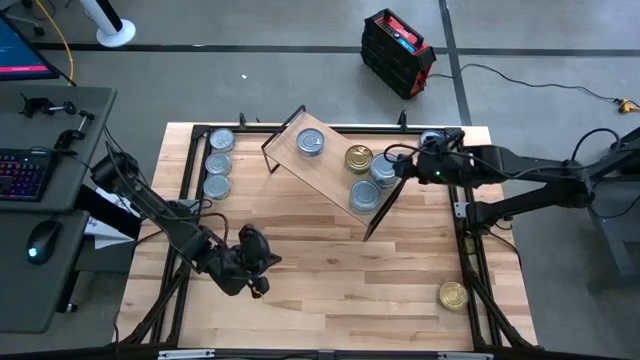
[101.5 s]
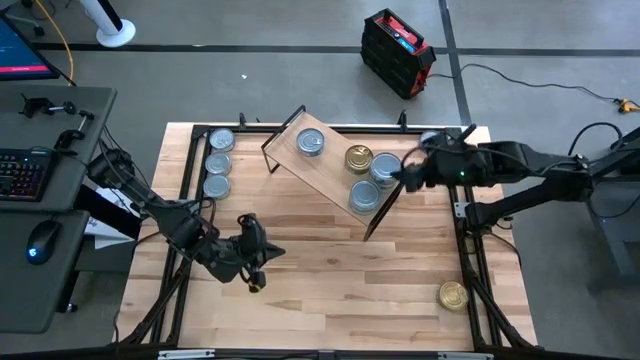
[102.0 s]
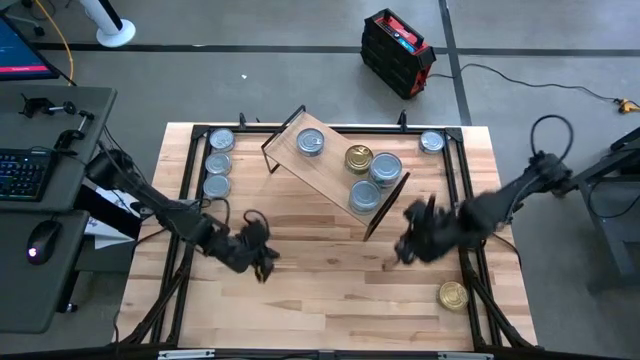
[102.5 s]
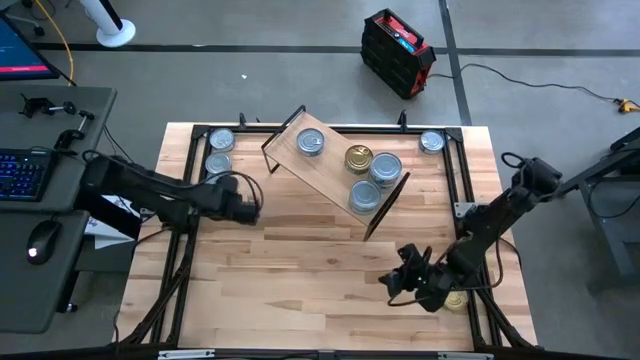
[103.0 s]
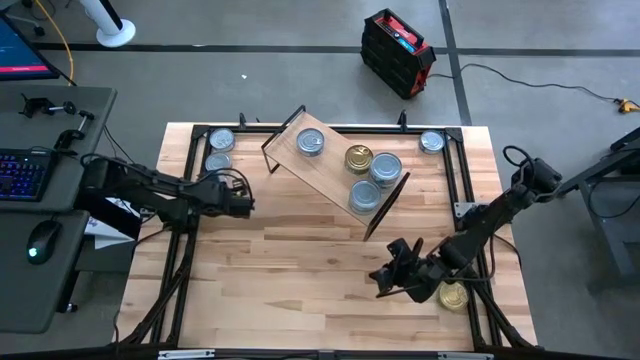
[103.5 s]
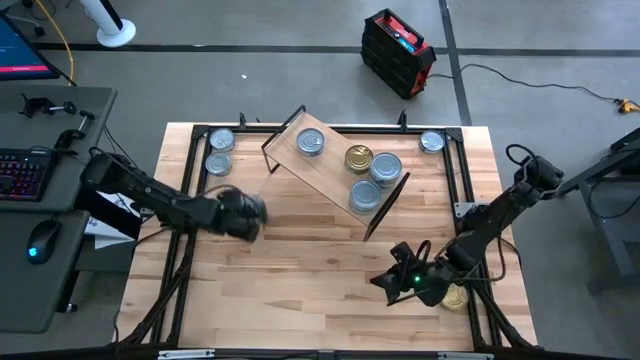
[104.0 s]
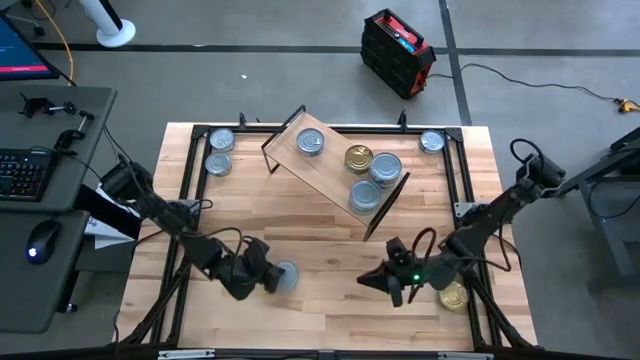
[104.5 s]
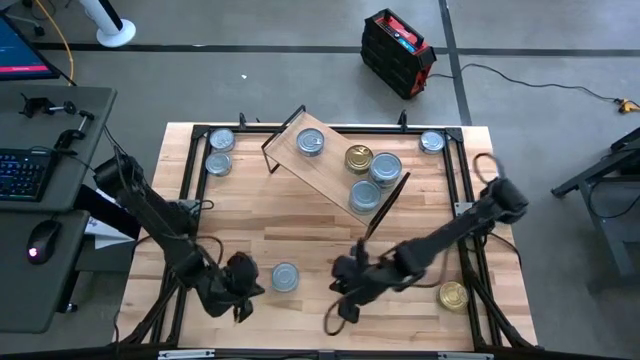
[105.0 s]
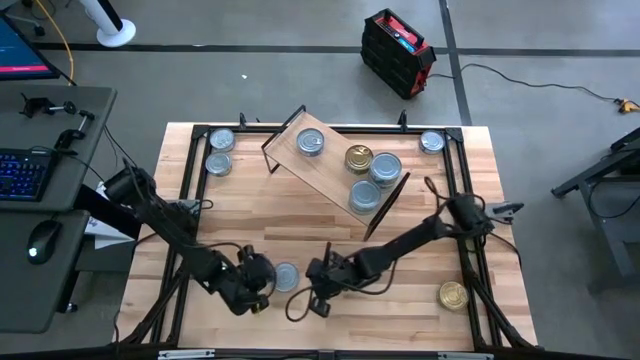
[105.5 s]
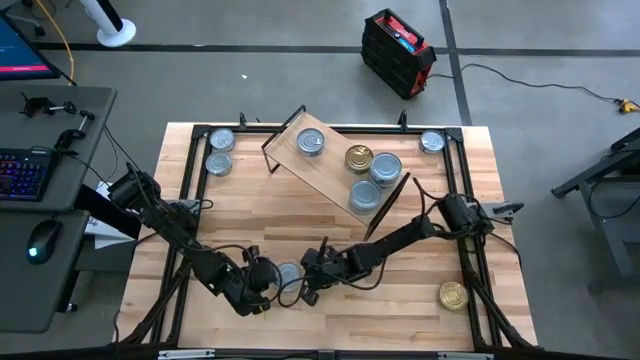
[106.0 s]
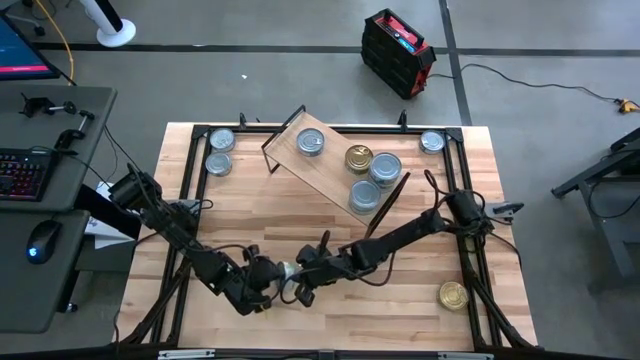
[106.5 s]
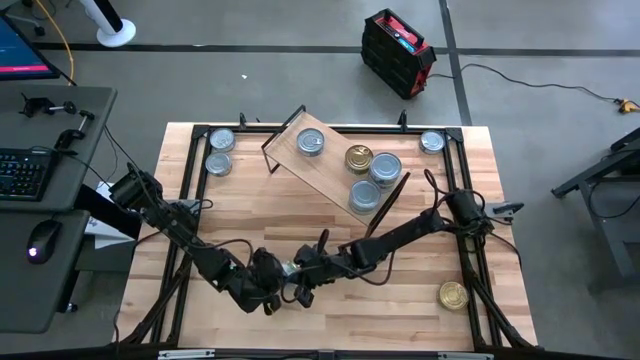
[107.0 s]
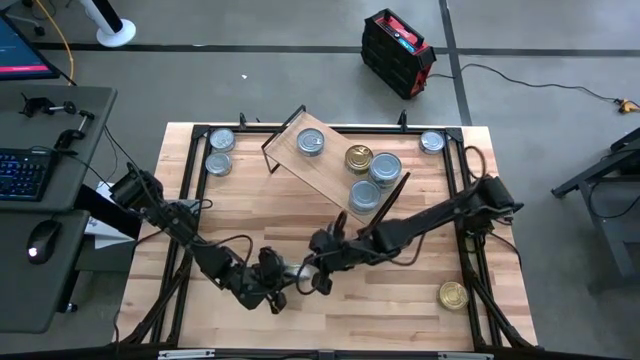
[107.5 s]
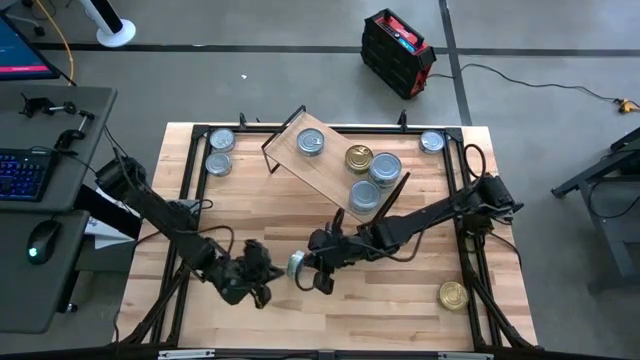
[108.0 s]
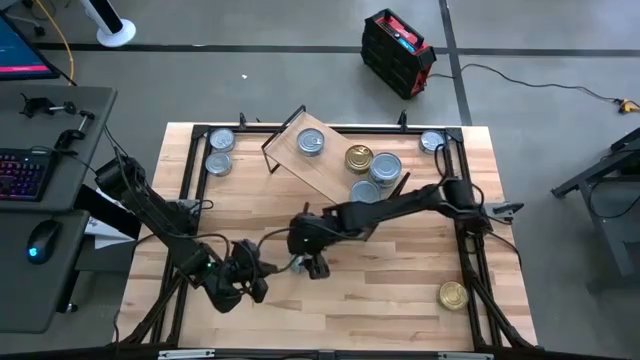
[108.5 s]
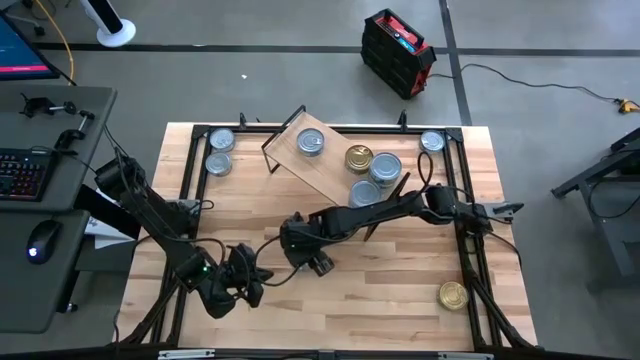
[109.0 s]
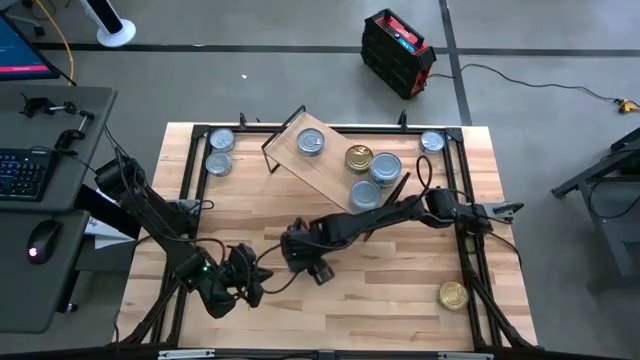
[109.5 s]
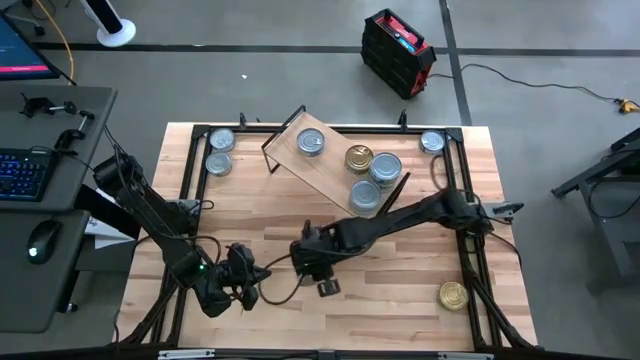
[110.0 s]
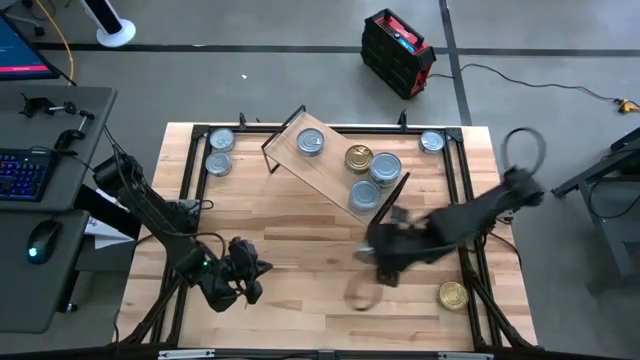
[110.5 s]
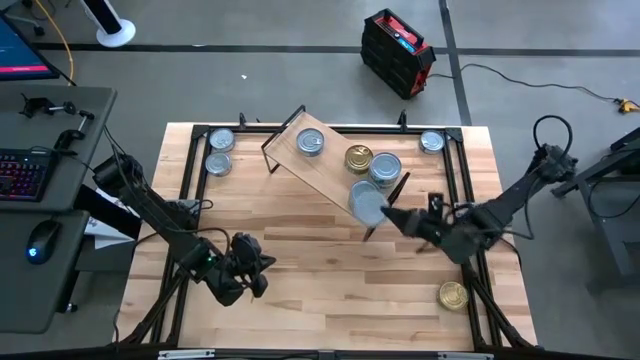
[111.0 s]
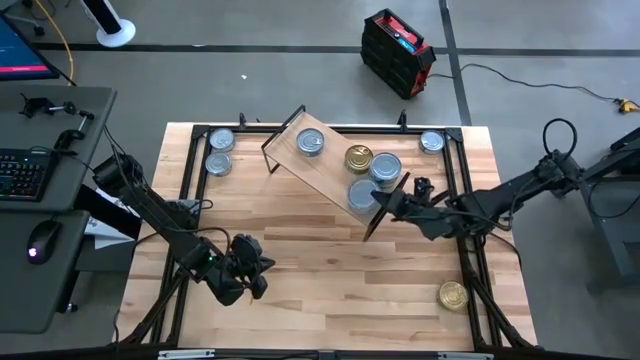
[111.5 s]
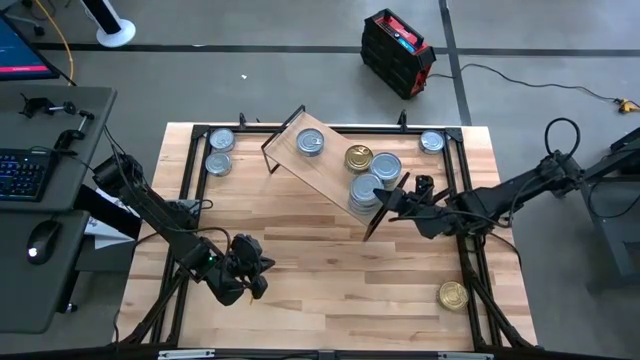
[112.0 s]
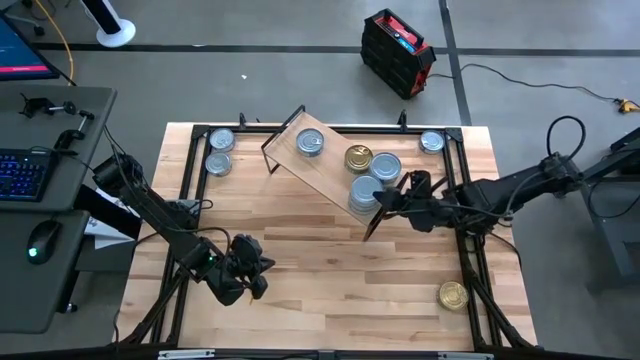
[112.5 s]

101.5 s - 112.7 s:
Task: Stack canned seafood by type on shelf
Stack the white-green tuna can on top of the other white-green tuna cans on the shelf

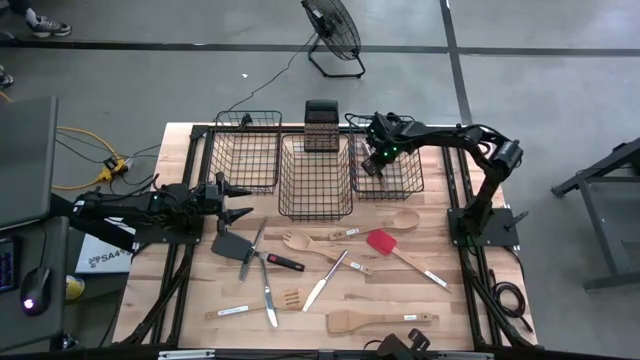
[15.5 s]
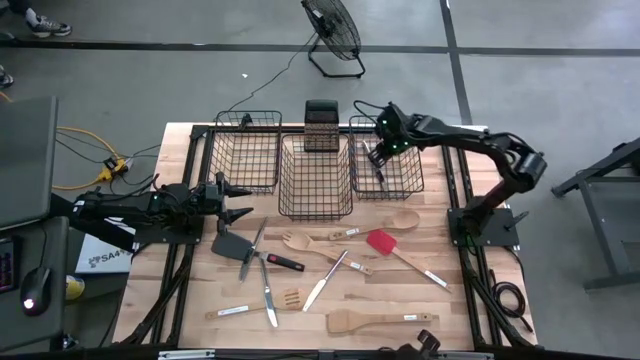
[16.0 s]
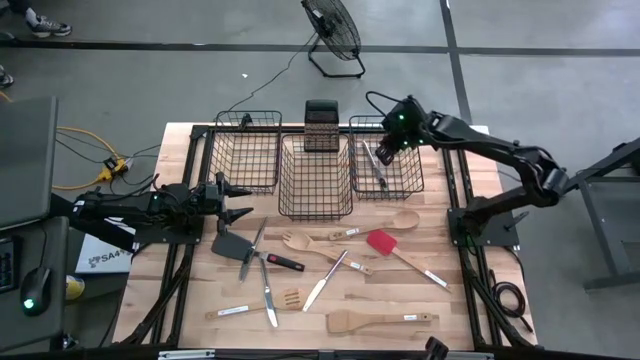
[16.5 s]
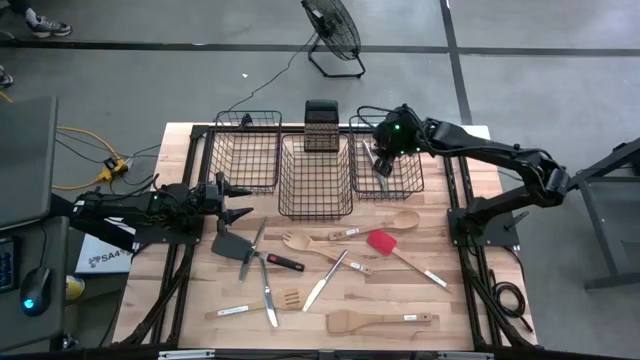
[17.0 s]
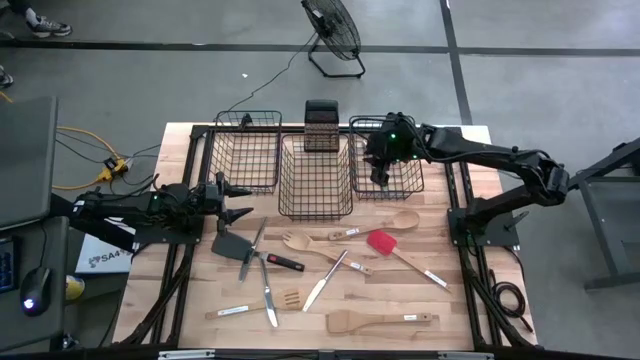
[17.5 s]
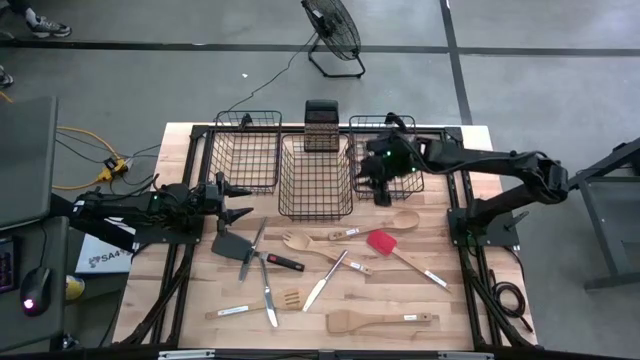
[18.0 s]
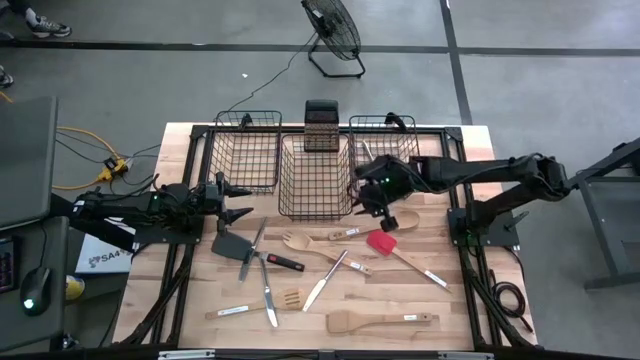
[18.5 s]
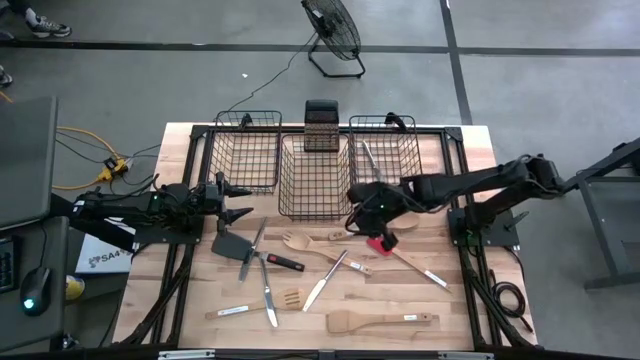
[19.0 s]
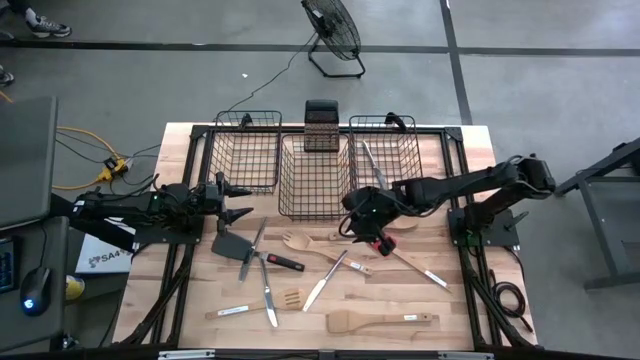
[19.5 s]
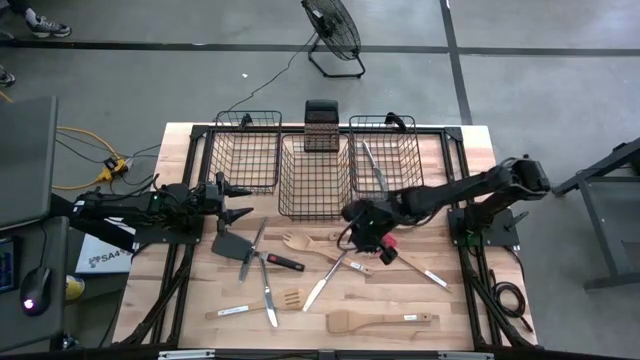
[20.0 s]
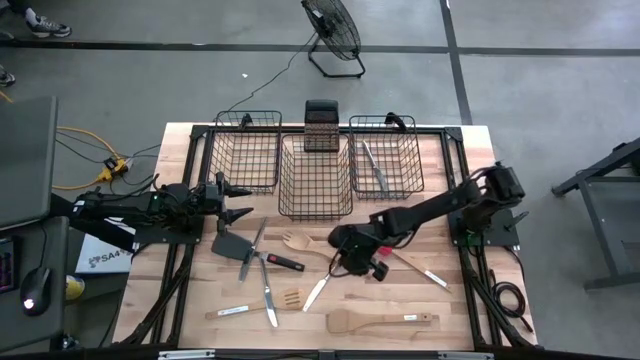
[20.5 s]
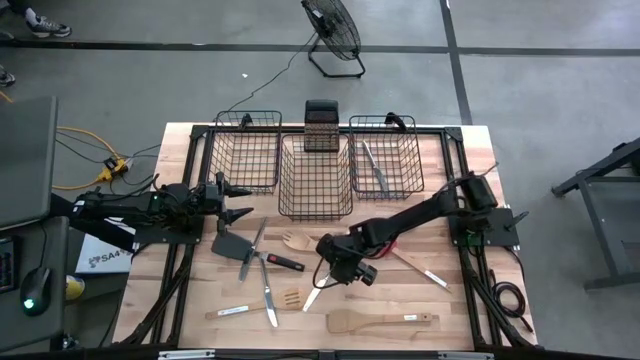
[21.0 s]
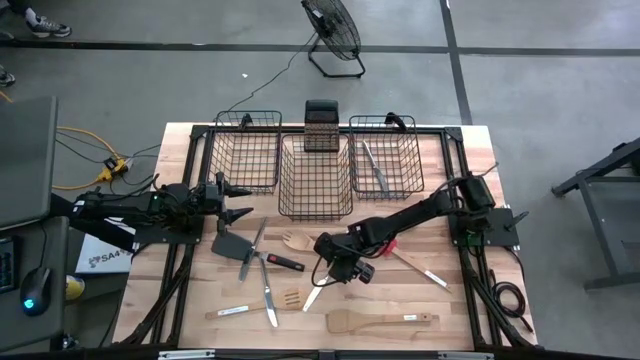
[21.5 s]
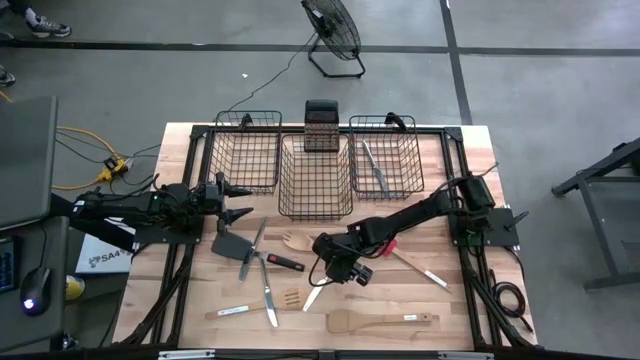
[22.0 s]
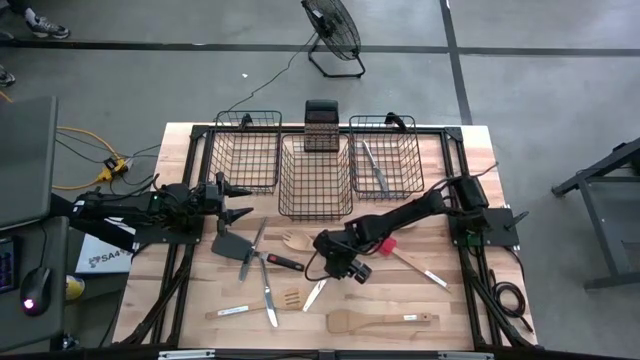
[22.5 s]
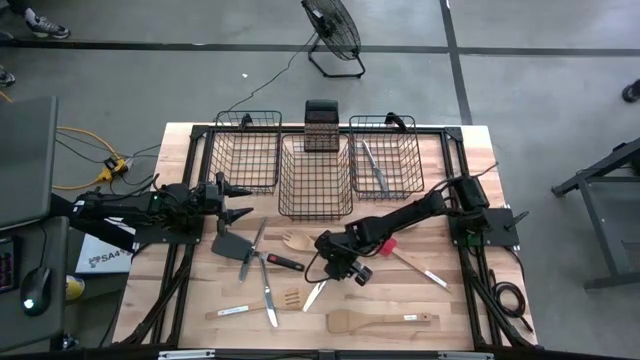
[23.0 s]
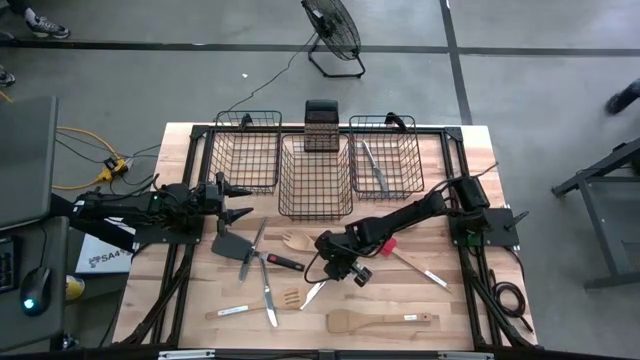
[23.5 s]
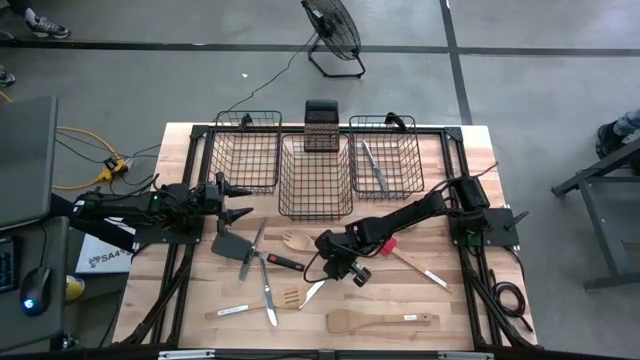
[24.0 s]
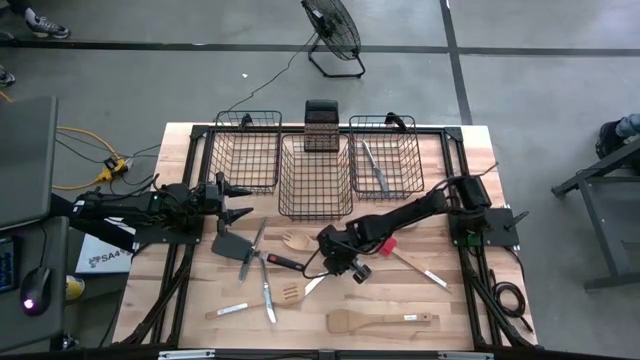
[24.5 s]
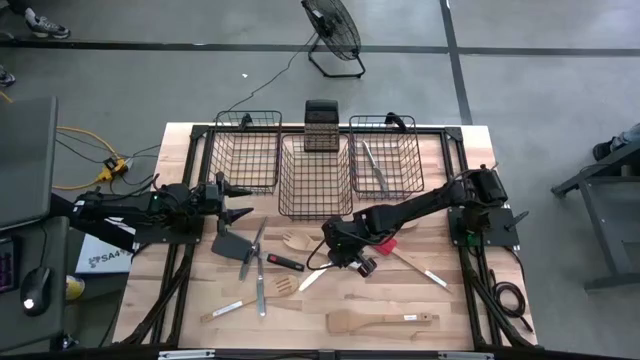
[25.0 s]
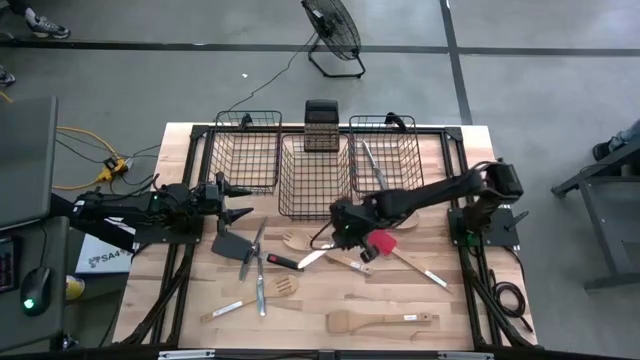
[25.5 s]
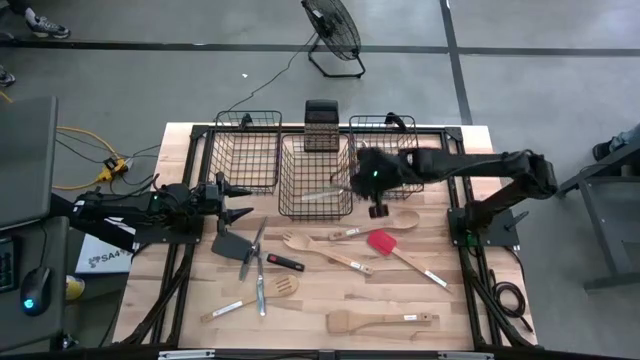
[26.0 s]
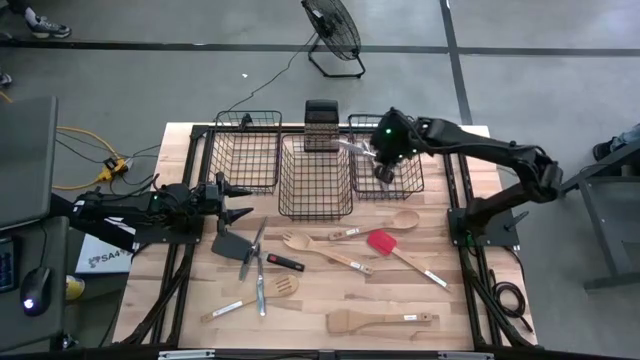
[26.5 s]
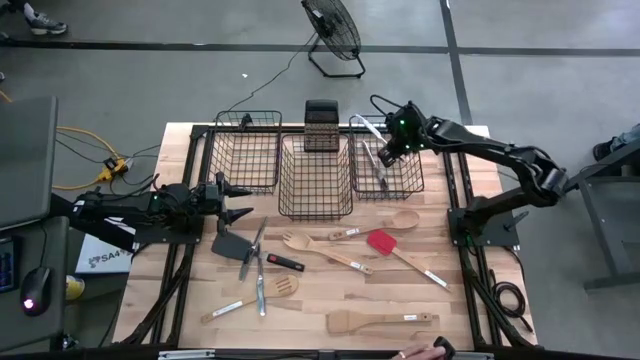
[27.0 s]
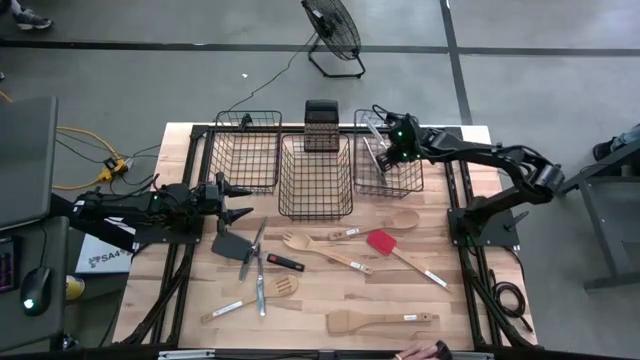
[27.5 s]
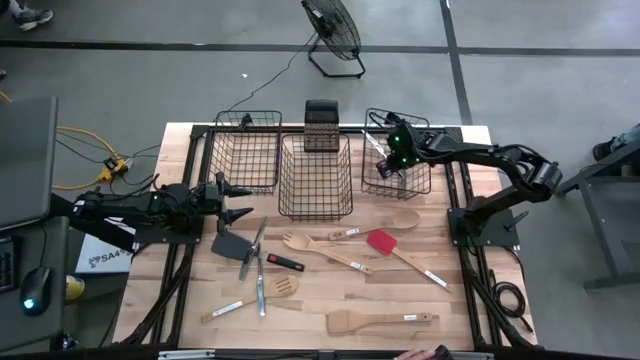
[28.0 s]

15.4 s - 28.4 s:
Task: Pick & Place Kitchen Items
Put the silver table knife into the right wire basket
